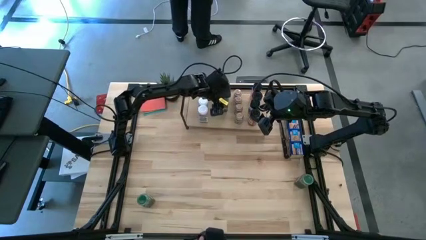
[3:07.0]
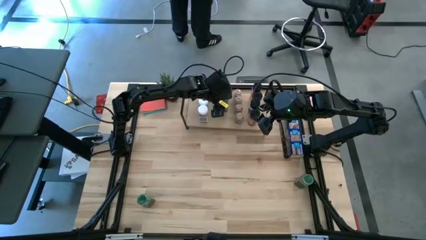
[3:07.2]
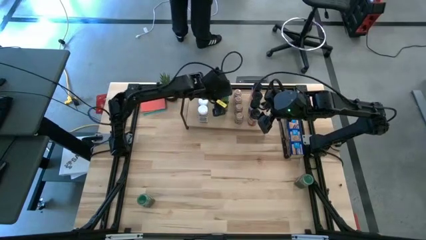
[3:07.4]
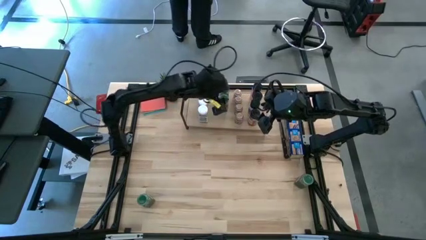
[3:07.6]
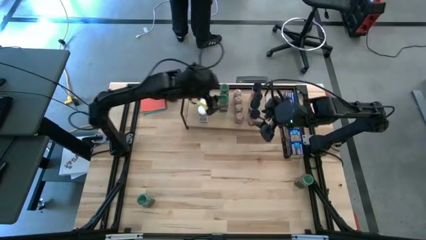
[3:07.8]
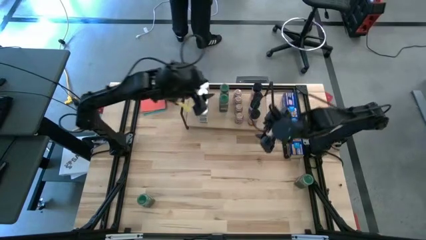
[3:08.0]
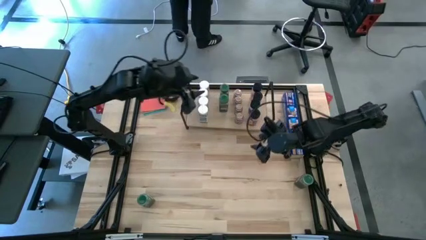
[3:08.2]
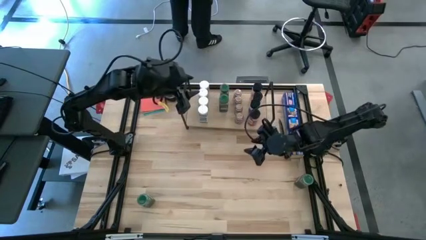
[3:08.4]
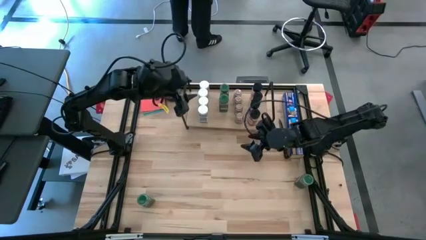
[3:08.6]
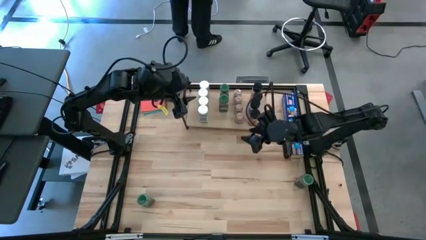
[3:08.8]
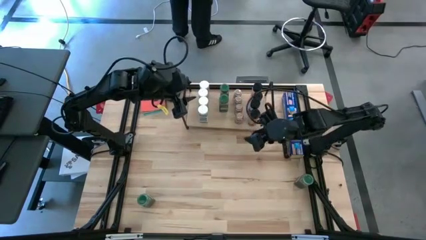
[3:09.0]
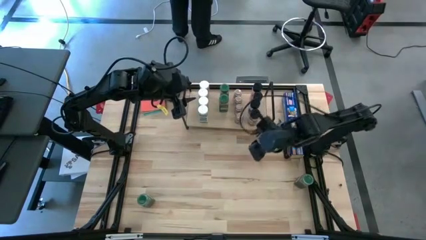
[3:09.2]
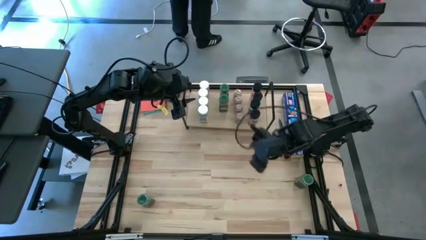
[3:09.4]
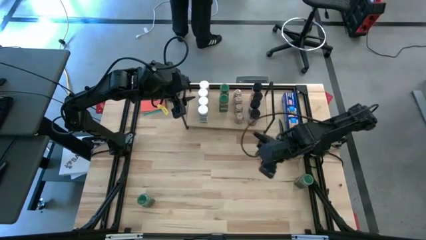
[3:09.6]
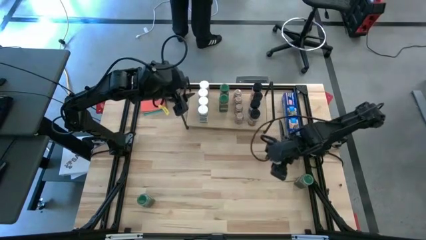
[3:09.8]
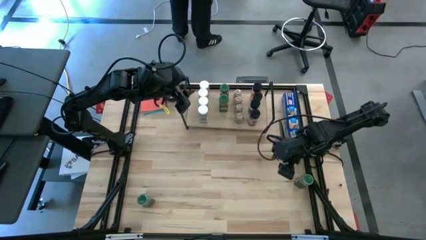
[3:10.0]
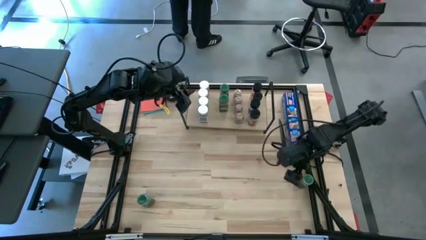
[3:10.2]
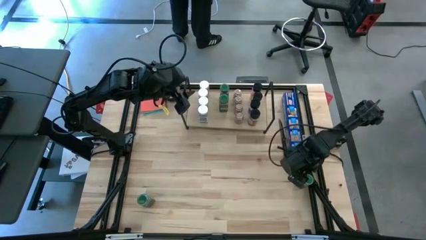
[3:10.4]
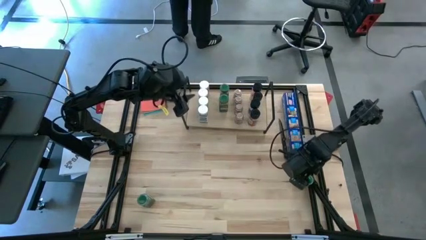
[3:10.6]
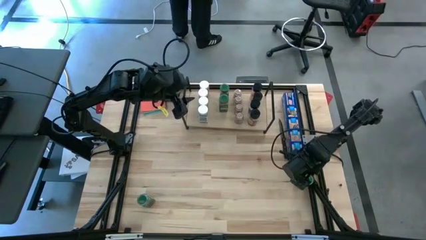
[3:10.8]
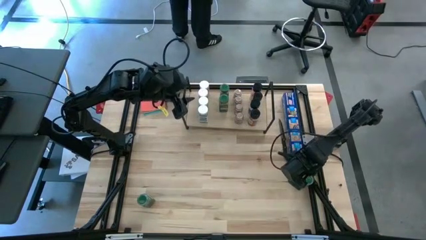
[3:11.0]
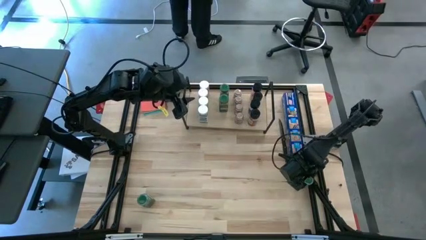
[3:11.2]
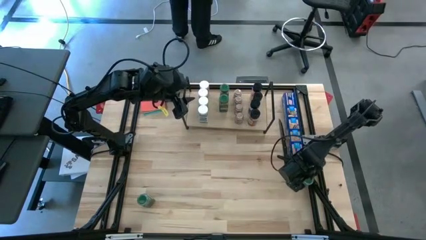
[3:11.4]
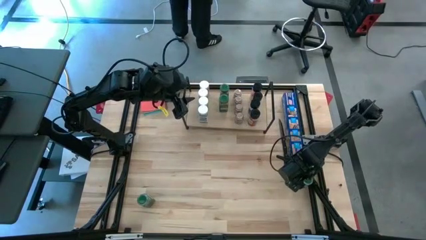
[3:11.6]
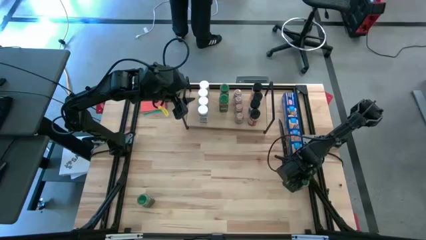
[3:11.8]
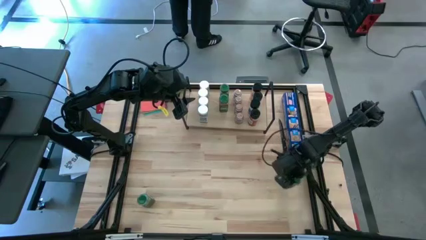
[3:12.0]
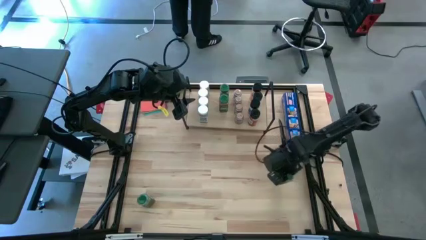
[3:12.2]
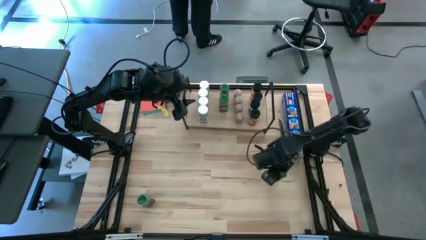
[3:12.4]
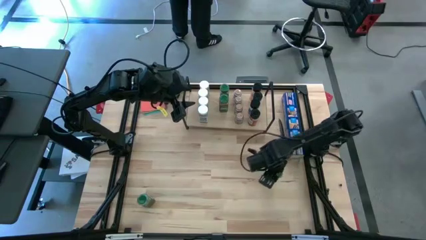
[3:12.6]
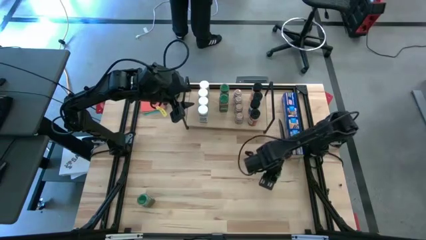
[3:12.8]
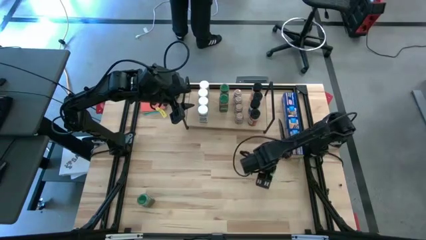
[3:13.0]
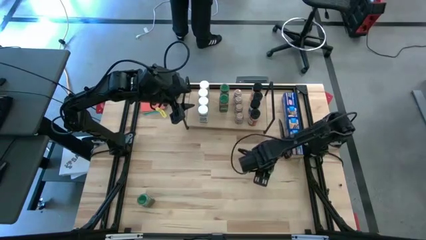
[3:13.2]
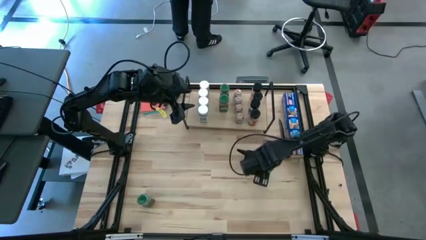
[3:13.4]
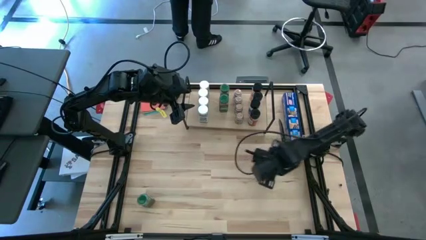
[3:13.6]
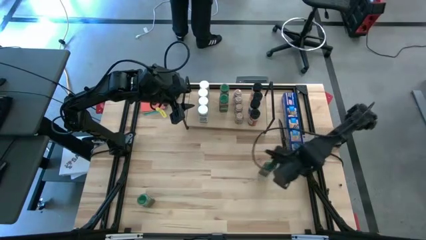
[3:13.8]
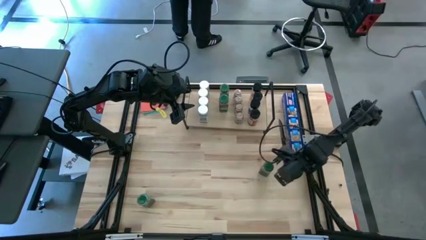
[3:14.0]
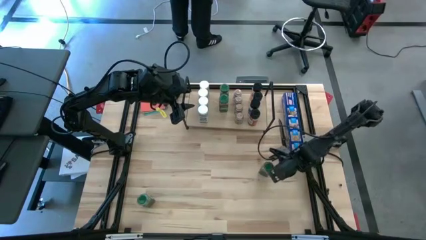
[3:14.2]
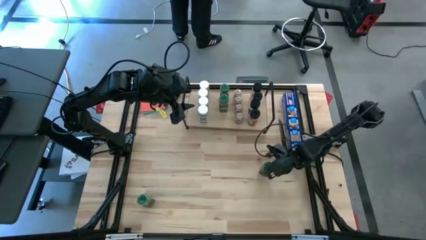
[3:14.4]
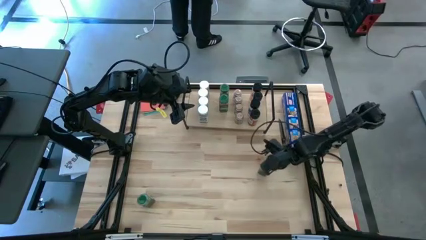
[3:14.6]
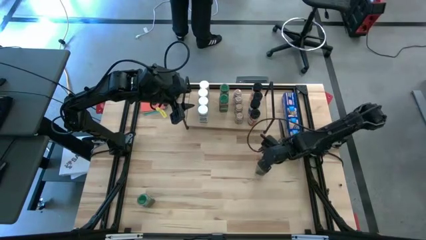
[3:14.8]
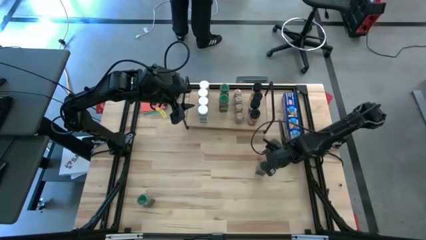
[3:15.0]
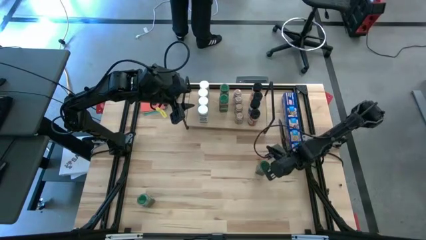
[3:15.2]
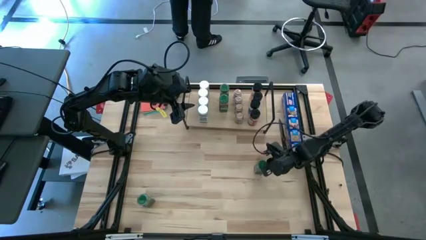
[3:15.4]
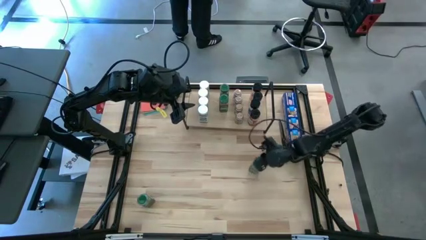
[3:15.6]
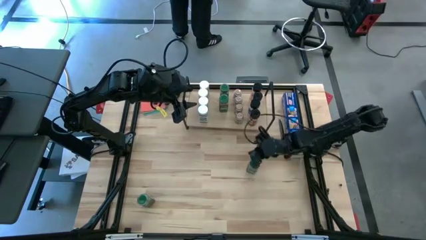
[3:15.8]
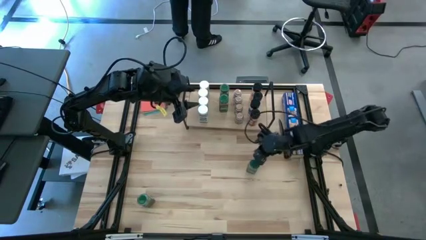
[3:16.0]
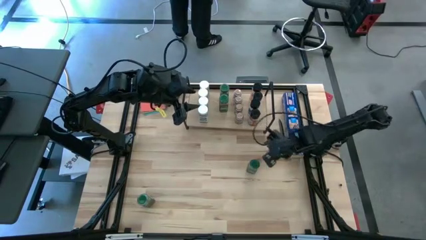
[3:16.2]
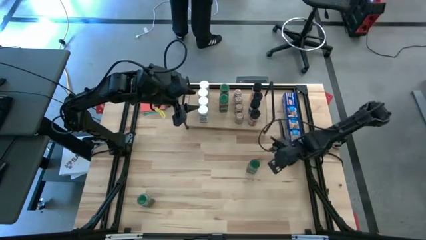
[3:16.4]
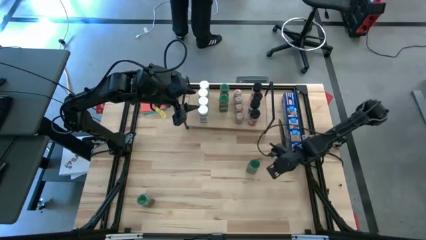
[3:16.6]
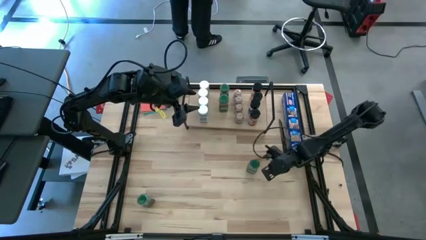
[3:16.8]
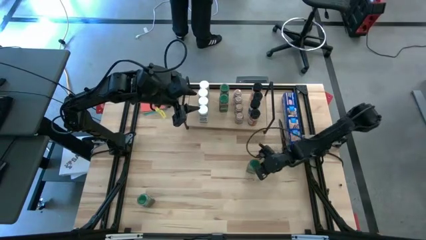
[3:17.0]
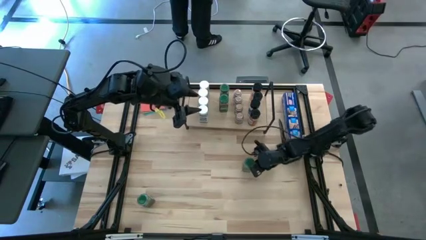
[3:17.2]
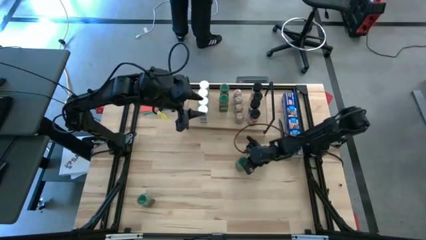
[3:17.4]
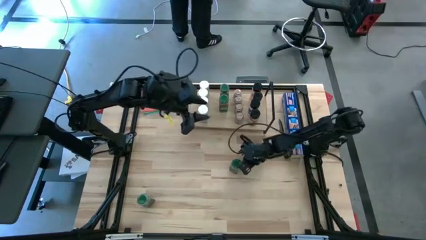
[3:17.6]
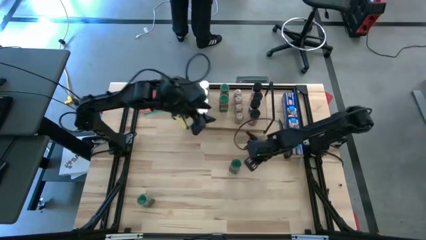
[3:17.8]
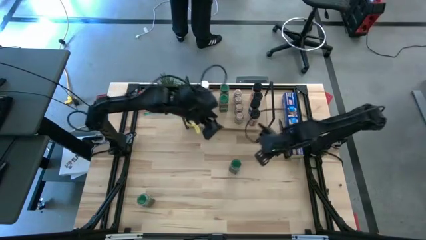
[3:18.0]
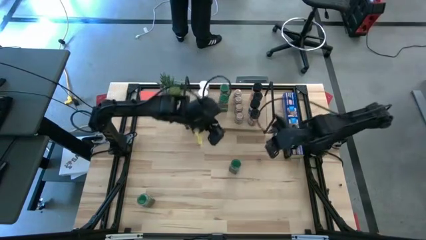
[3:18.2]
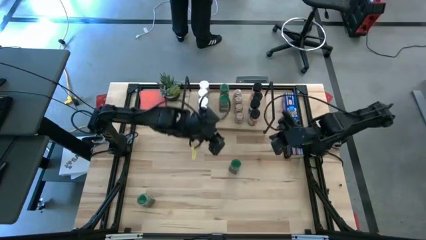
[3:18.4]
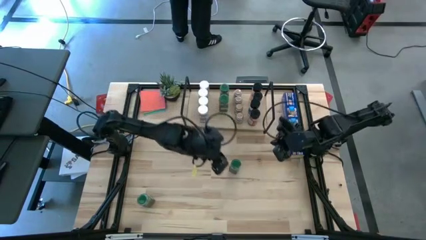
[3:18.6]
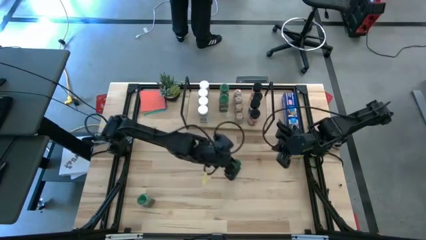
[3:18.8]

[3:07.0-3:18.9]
Task: Shelf spices
Put the green seasoning bottle on the shelf, aligned with the other green bottle

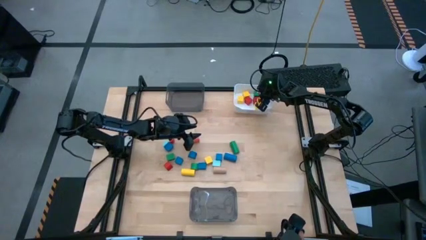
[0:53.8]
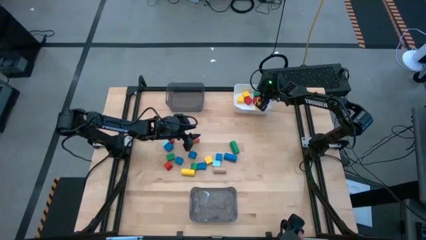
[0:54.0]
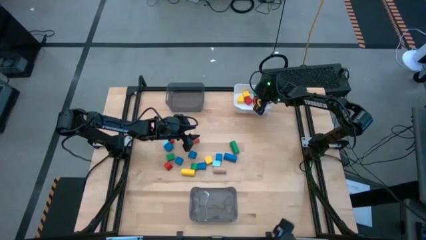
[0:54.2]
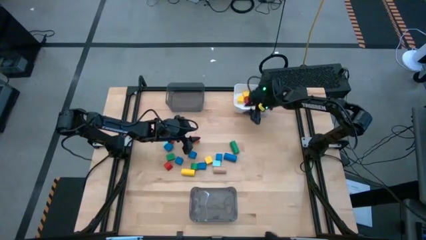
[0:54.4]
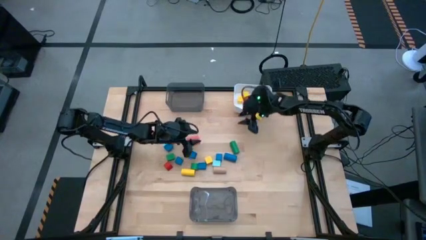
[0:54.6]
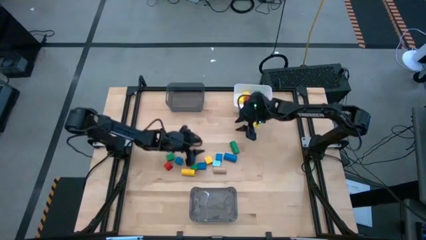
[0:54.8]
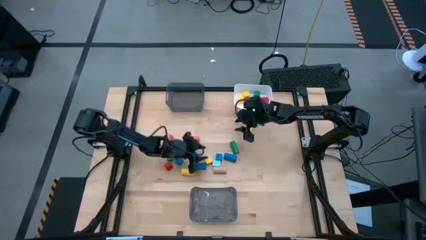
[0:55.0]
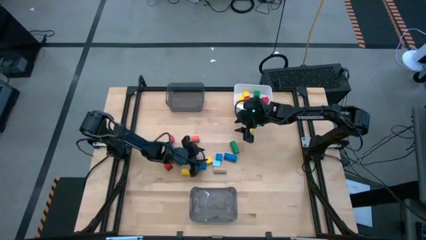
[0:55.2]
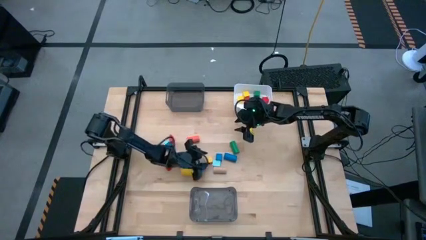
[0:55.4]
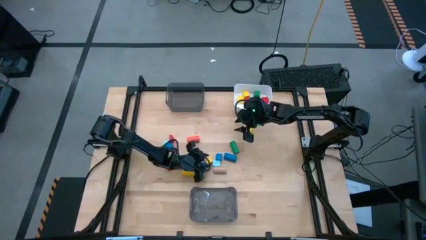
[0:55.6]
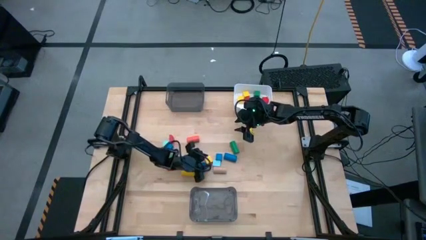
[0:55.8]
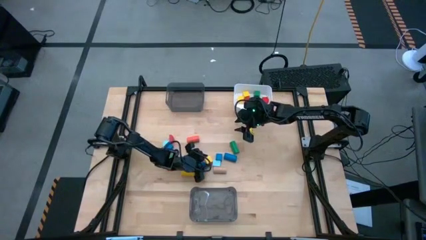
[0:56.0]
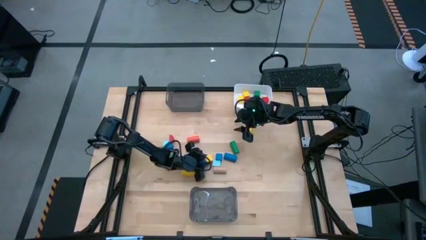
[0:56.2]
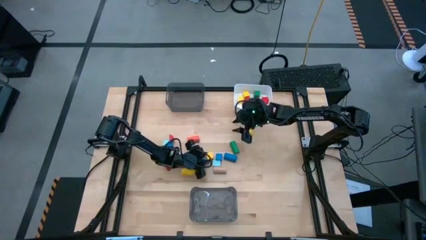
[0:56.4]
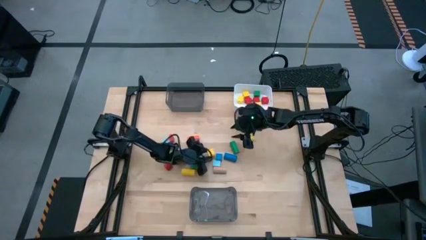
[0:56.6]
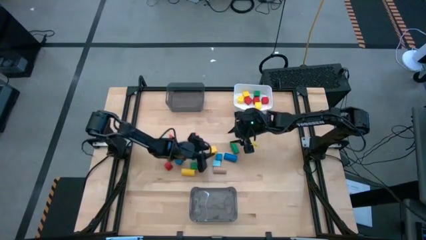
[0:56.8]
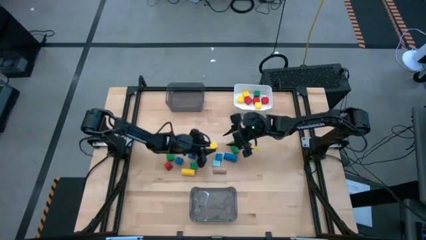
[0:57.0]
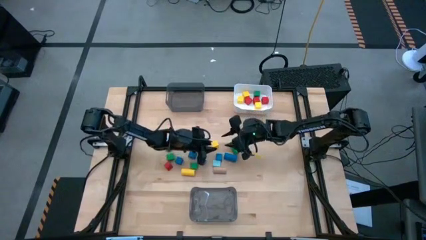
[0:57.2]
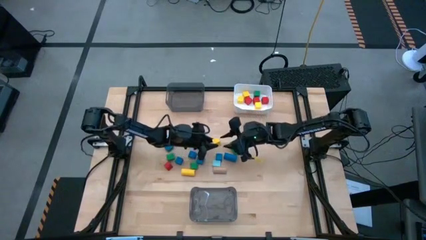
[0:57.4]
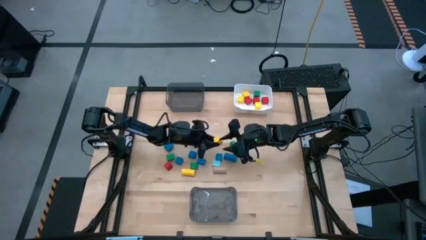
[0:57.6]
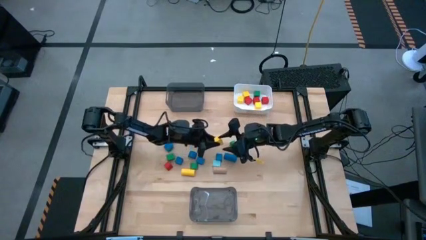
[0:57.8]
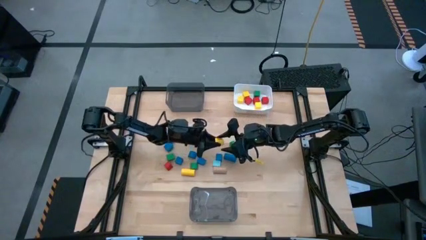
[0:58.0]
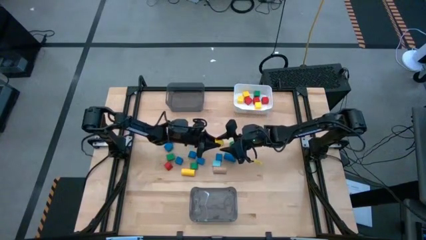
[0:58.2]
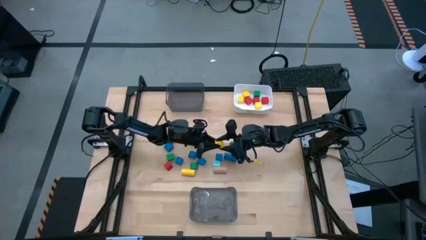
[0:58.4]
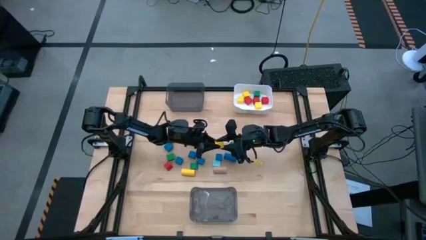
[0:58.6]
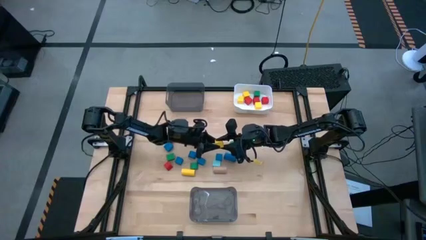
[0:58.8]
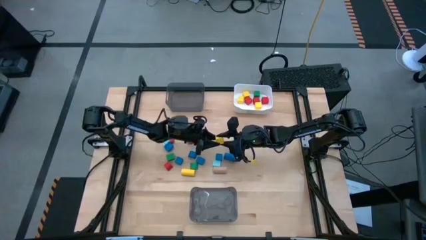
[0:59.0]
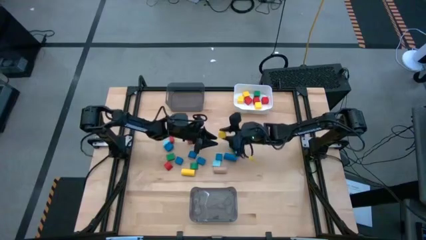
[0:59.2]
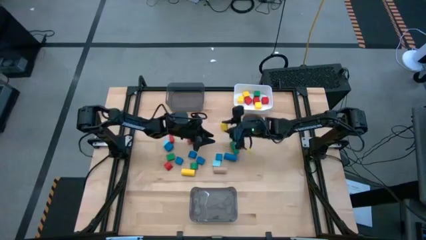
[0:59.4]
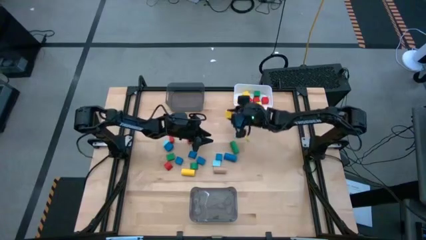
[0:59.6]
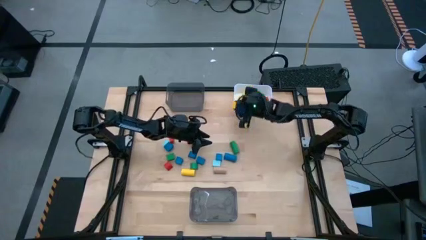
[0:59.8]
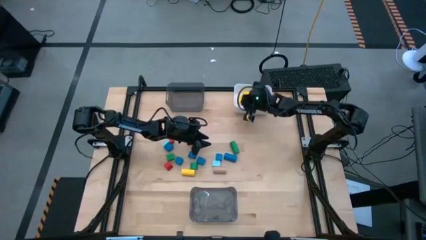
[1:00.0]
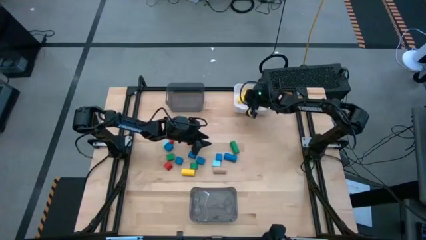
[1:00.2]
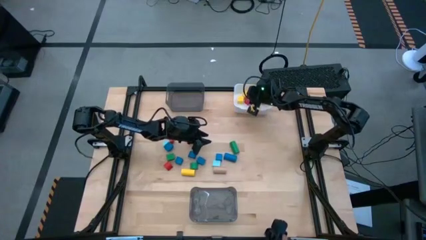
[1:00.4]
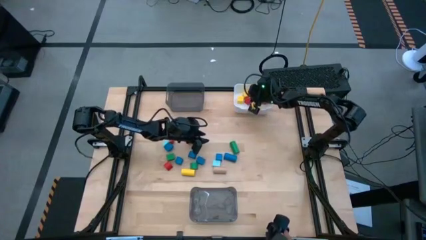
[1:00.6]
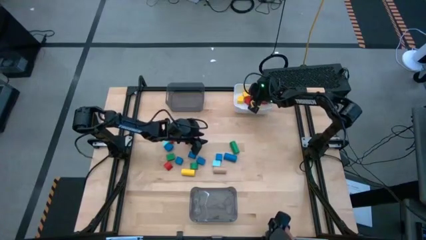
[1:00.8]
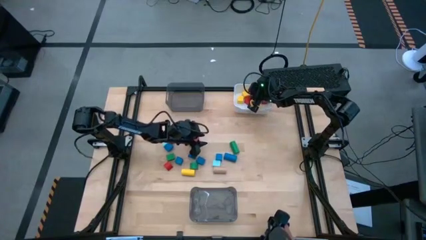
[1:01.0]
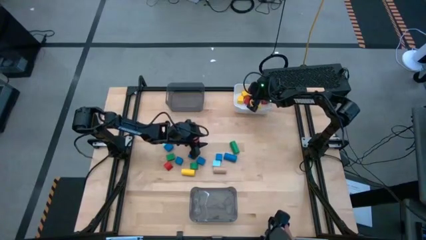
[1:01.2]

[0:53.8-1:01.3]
Task: Sort blocks by size
Put the yellow square block into the white bin
